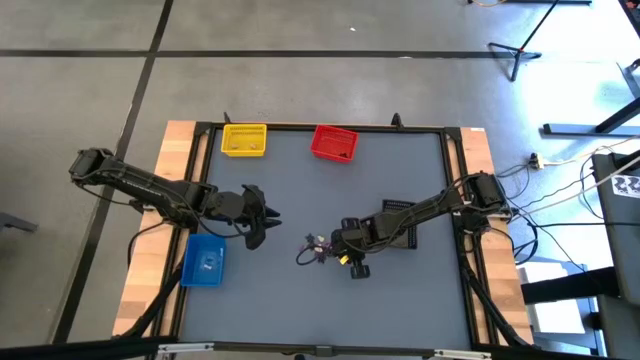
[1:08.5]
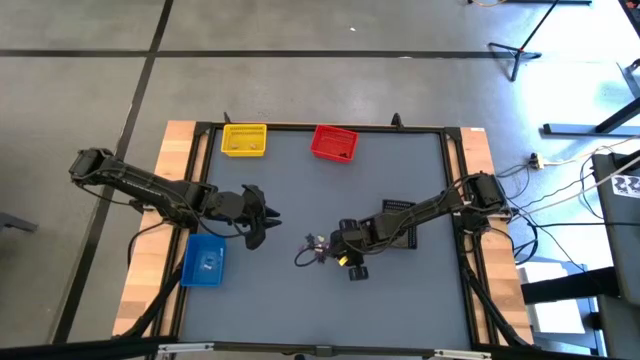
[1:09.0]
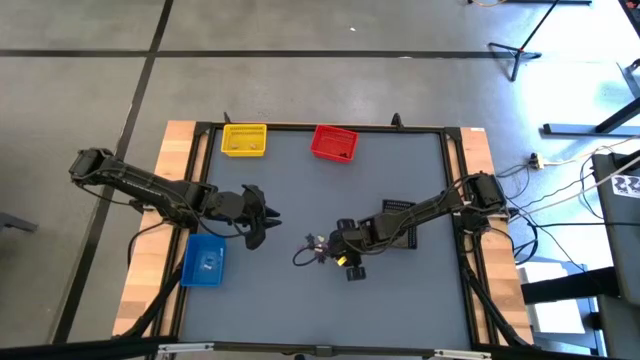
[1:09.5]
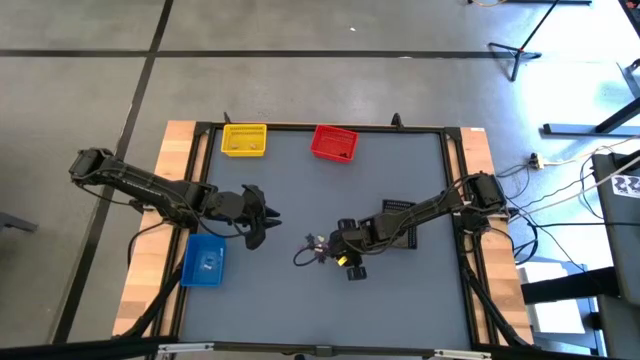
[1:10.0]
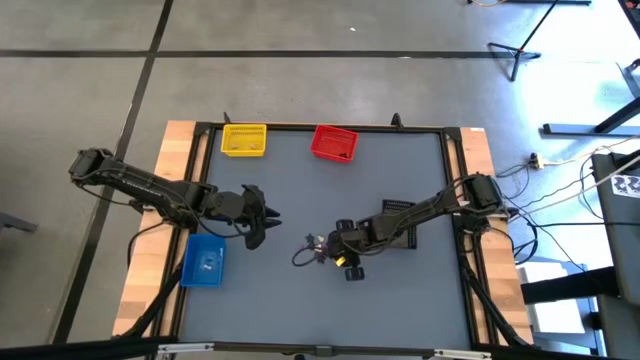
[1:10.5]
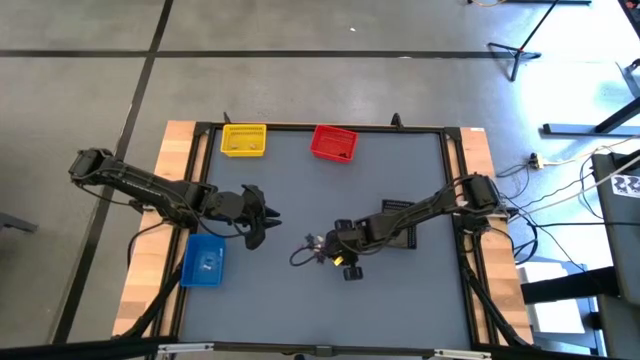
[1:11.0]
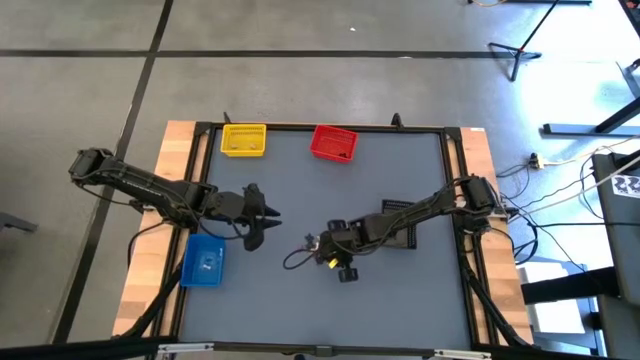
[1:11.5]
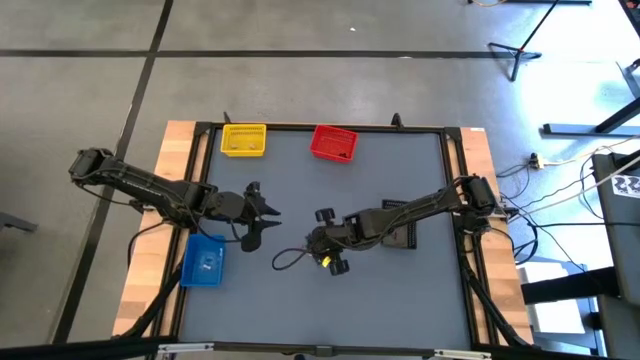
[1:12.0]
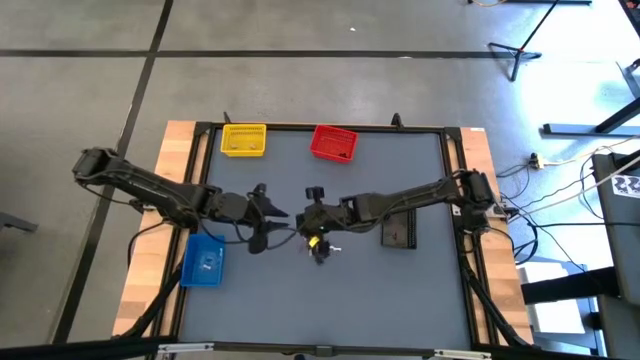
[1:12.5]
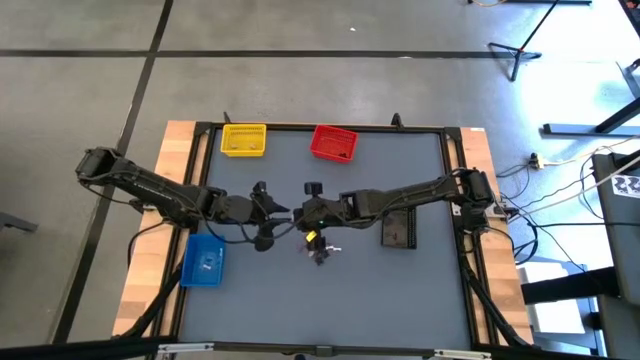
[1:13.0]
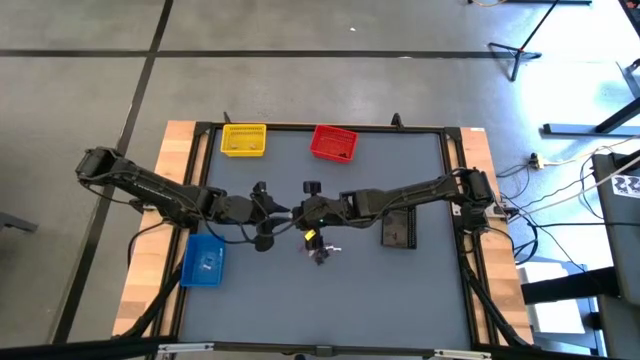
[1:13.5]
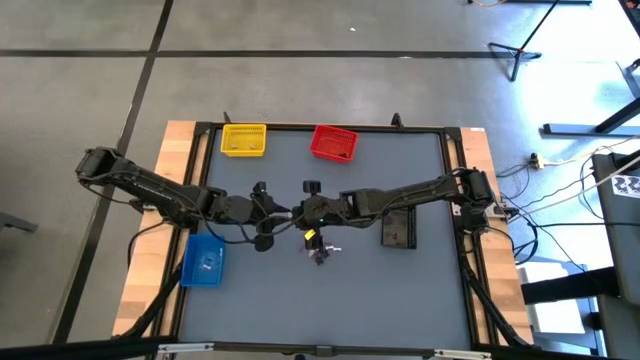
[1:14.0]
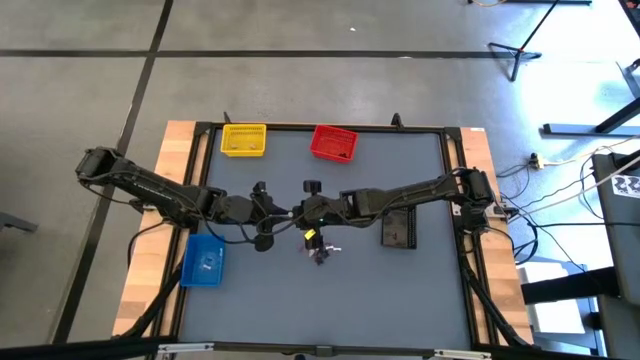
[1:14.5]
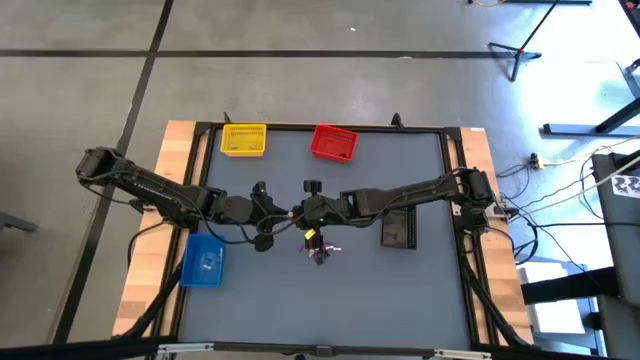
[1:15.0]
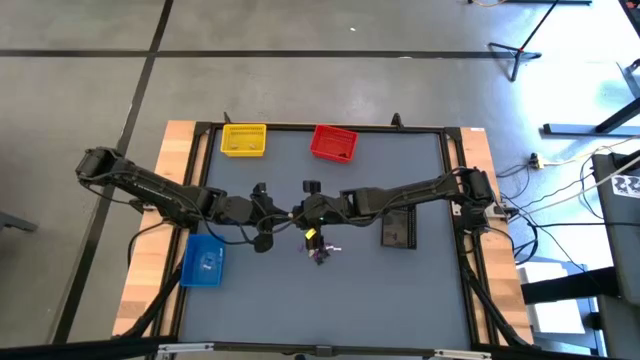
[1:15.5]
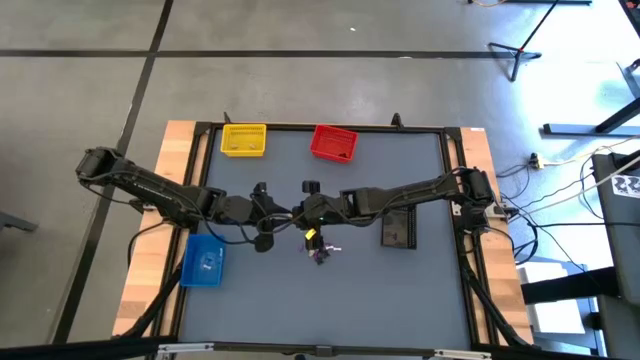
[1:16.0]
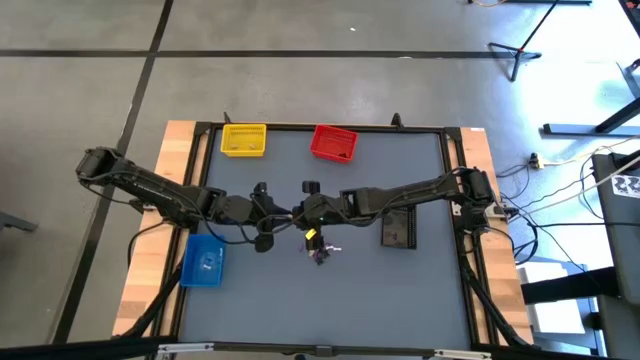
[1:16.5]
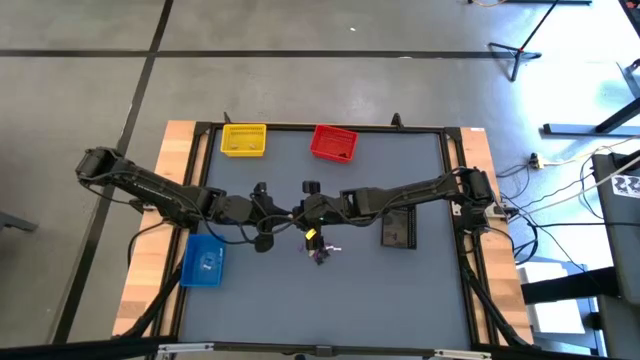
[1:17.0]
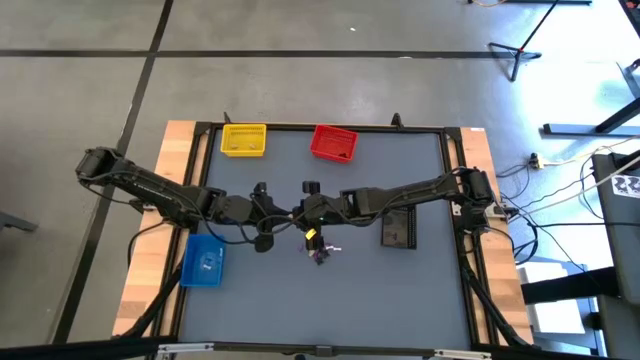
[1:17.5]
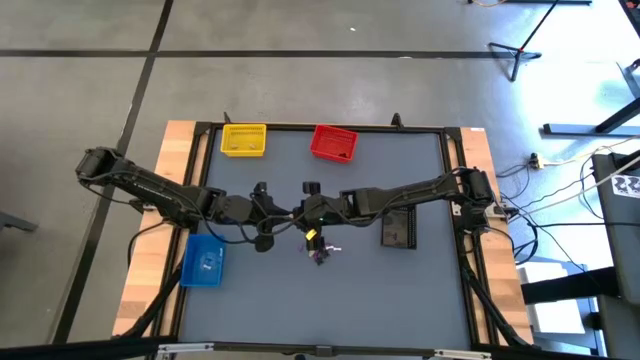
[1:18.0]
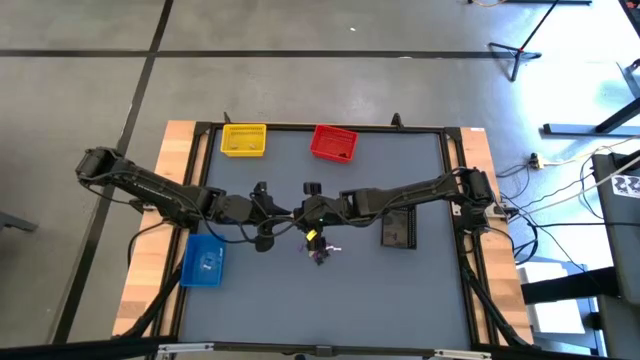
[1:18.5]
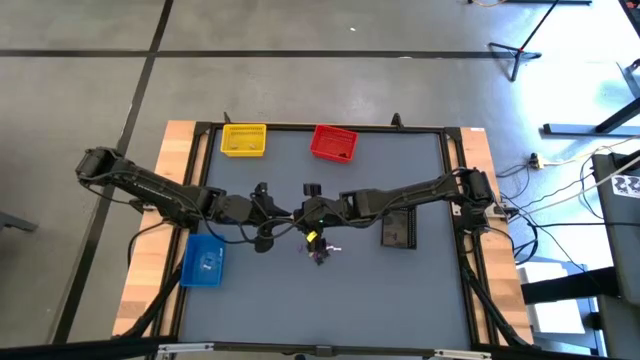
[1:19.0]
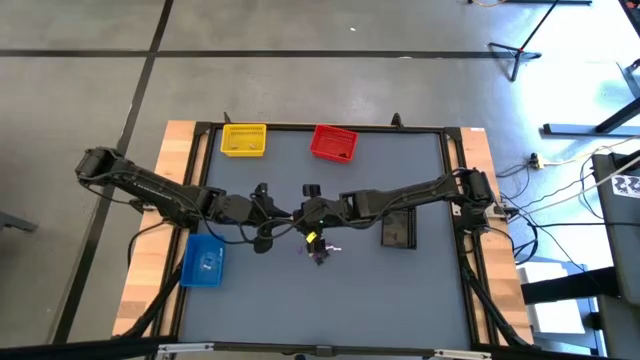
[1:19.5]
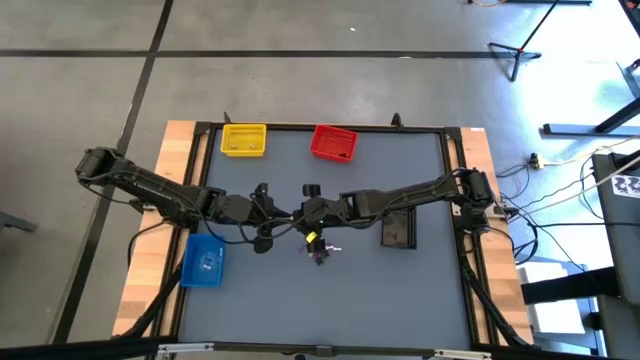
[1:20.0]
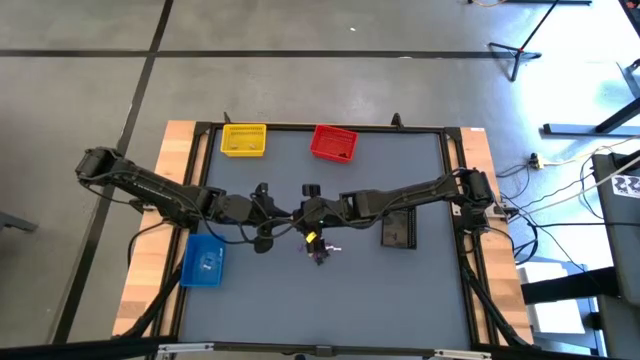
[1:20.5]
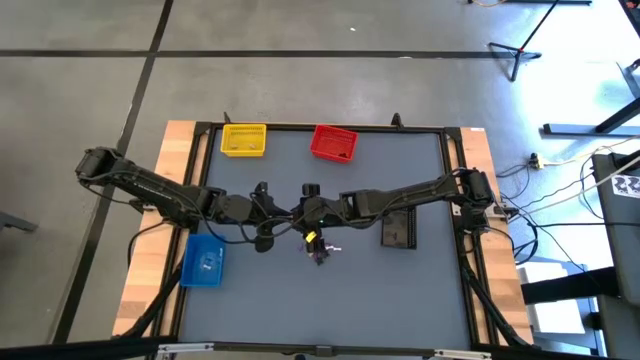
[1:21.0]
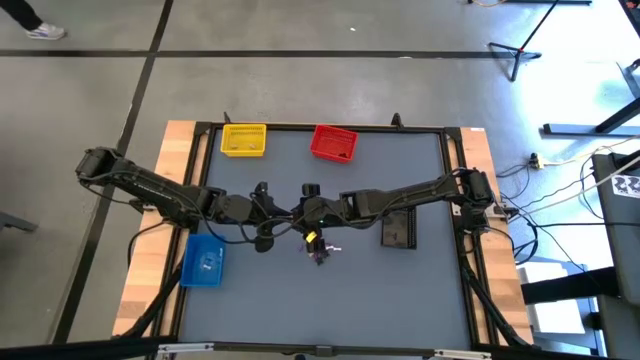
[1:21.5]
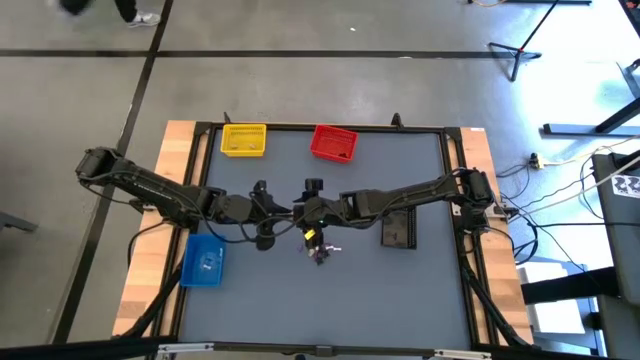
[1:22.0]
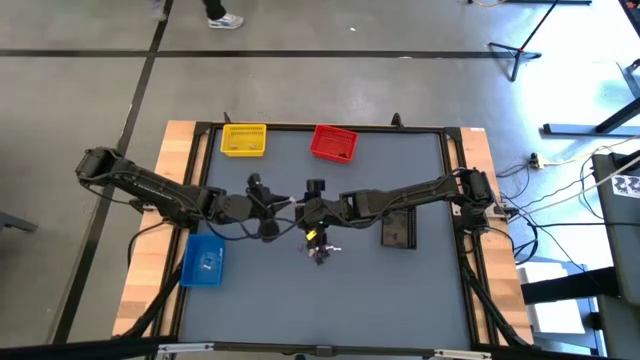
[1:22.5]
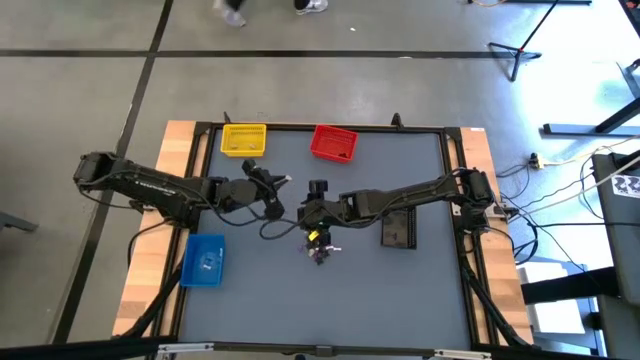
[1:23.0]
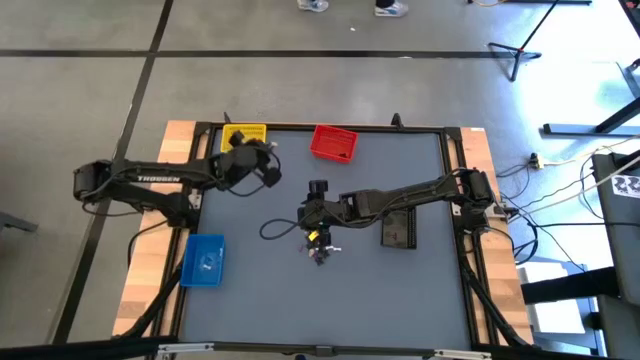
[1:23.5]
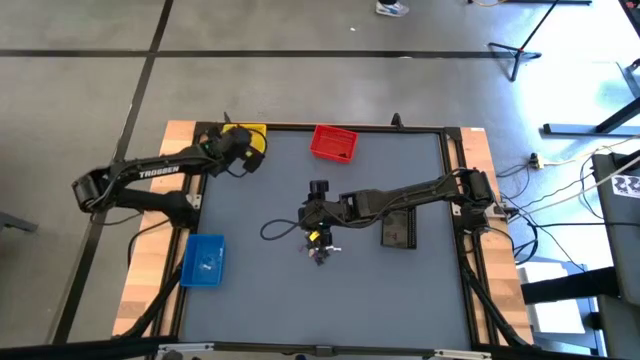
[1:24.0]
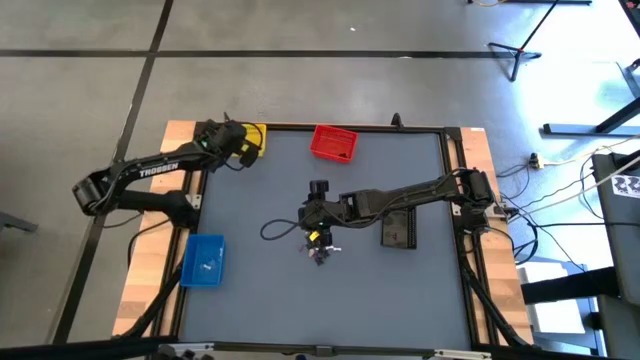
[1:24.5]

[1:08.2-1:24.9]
Task: Sort Halloween decoration
Put the yellow skull toy into the yellow bin

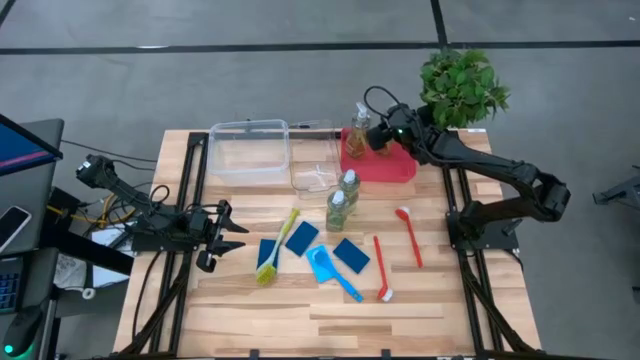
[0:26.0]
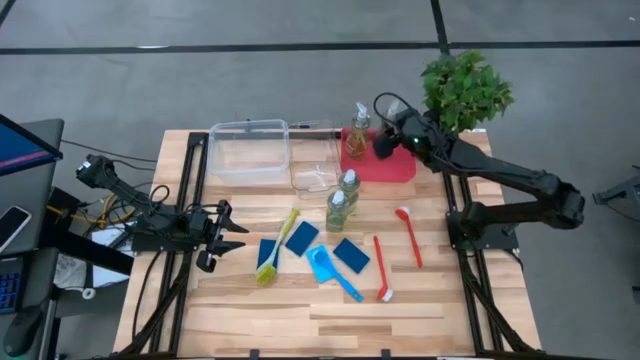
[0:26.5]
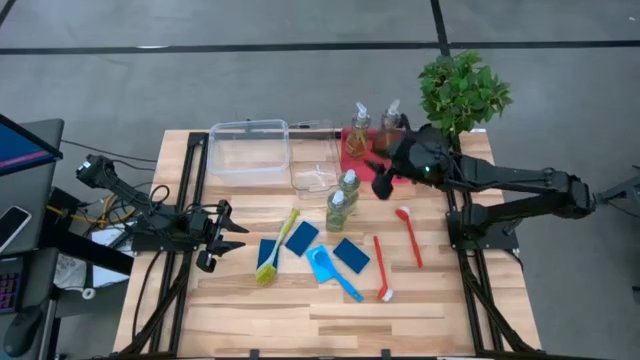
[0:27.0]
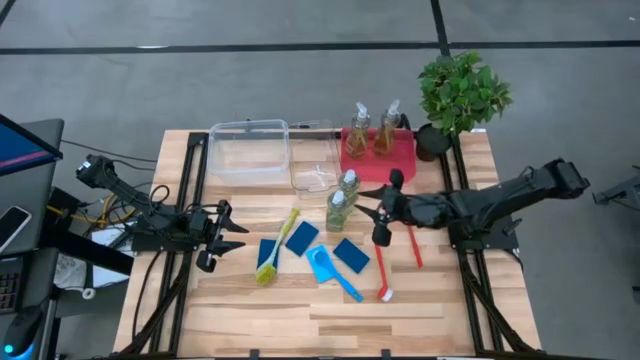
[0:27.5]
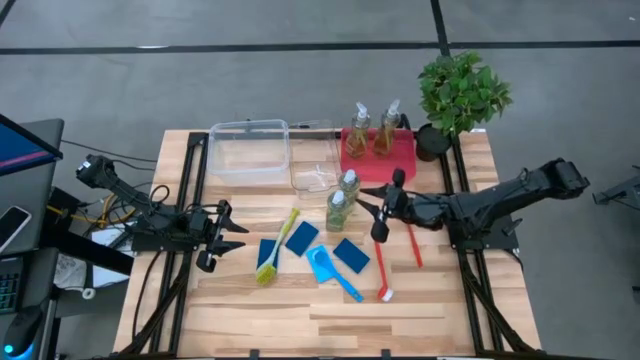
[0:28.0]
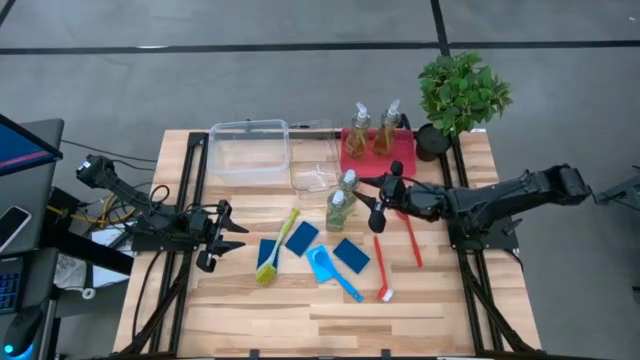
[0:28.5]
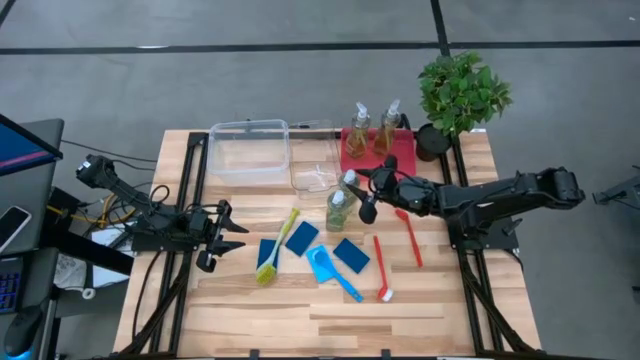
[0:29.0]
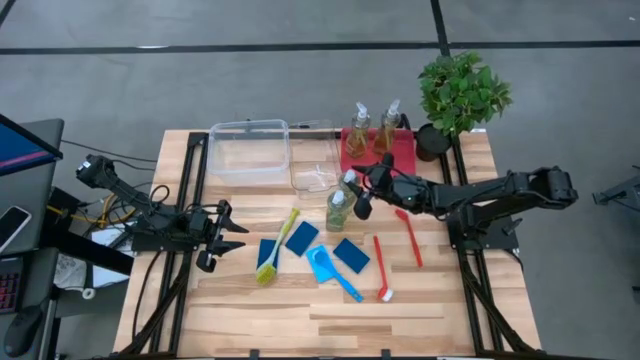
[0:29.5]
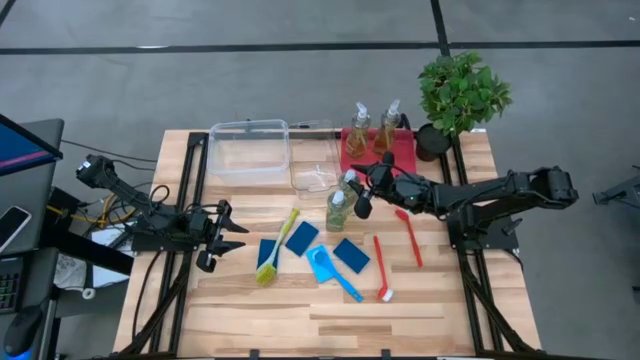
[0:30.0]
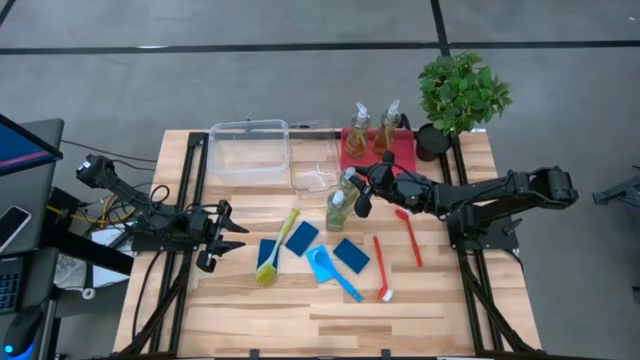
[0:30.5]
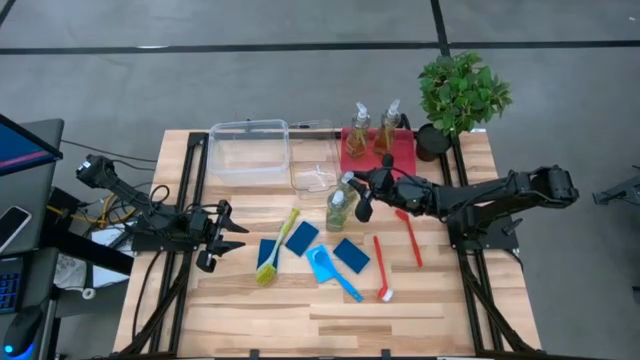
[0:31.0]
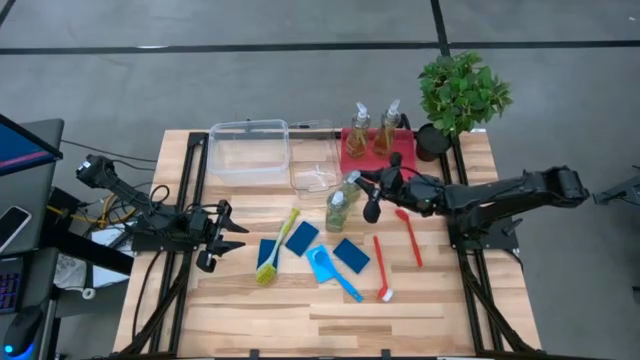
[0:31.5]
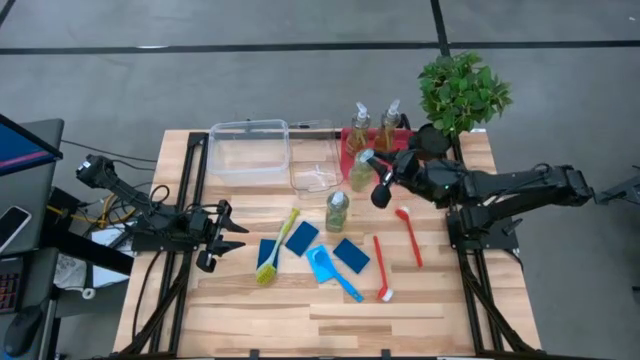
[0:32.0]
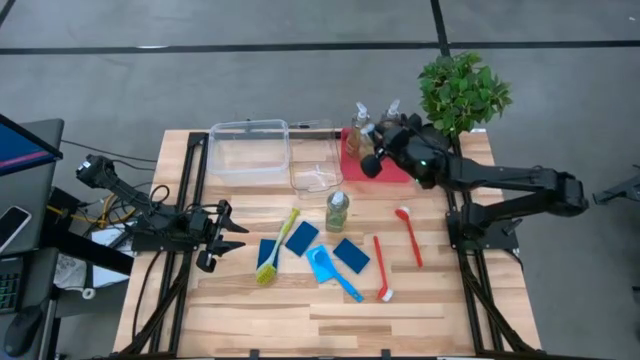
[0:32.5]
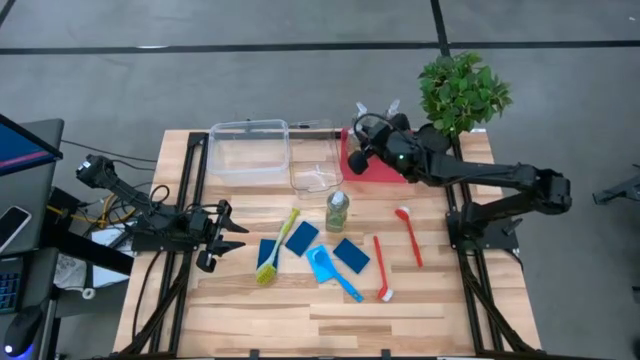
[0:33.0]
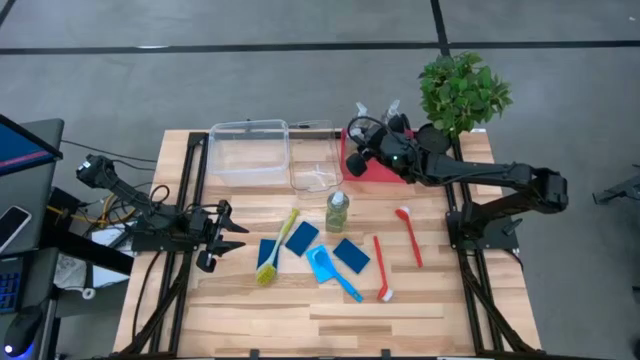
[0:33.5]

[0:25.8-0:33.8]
Task: Pick & Place Kitchen Sink Supplies
Put the soap dispenser into the red bin
